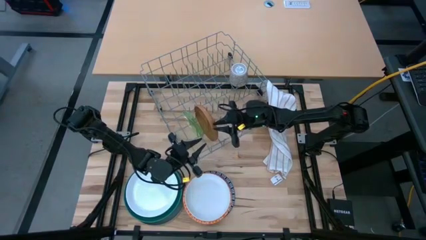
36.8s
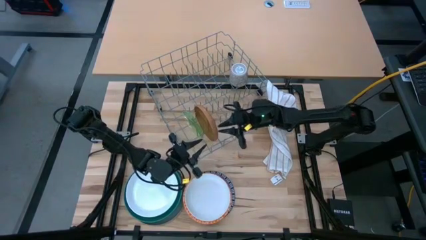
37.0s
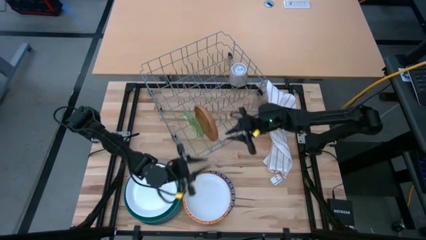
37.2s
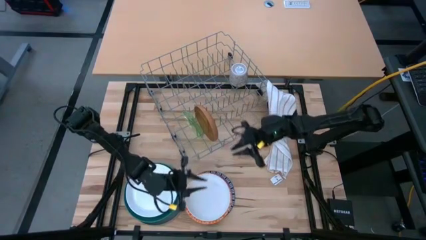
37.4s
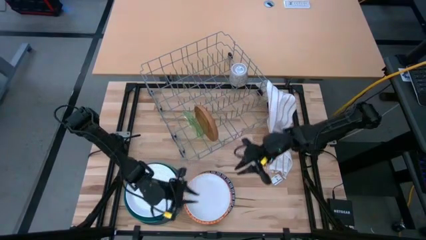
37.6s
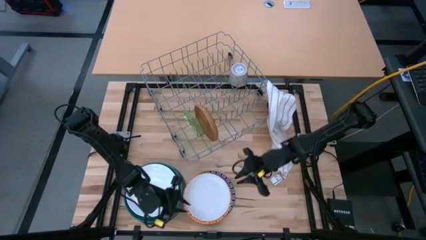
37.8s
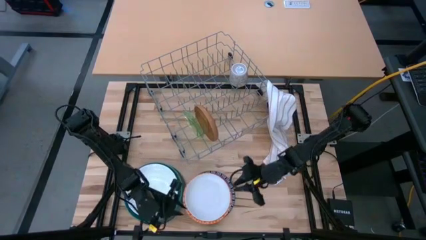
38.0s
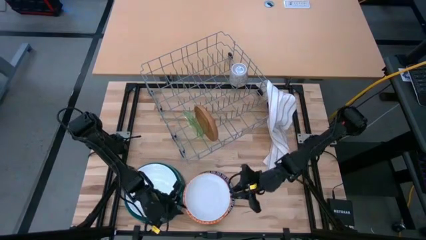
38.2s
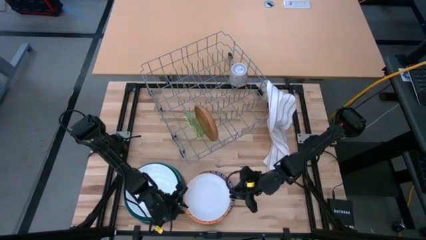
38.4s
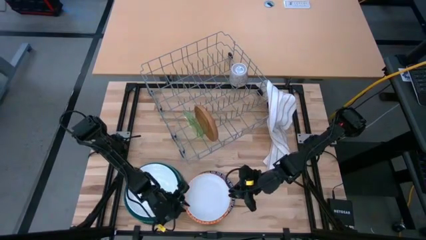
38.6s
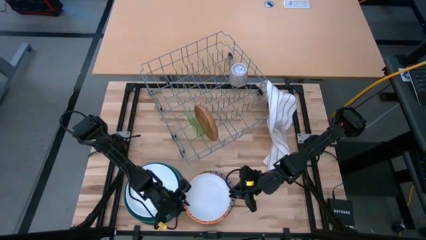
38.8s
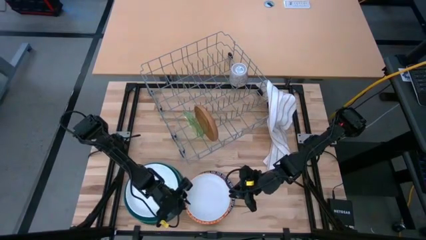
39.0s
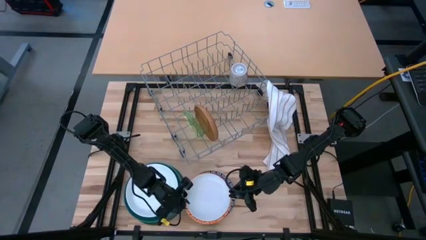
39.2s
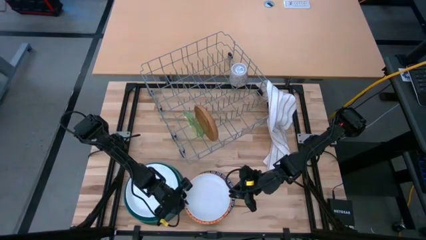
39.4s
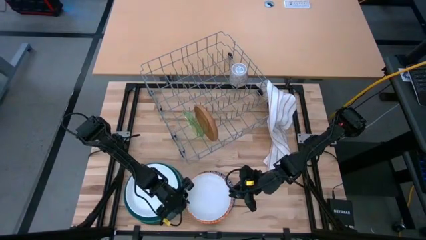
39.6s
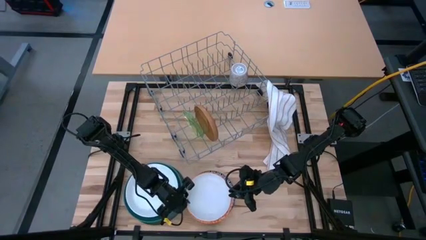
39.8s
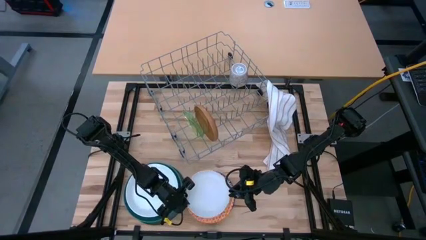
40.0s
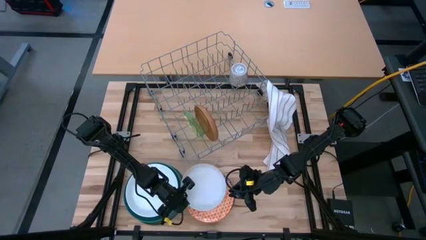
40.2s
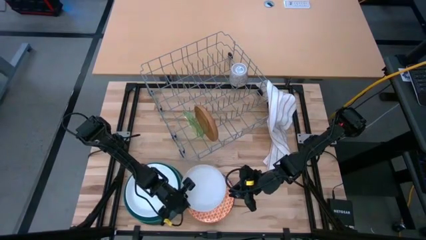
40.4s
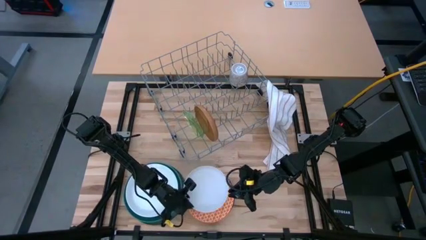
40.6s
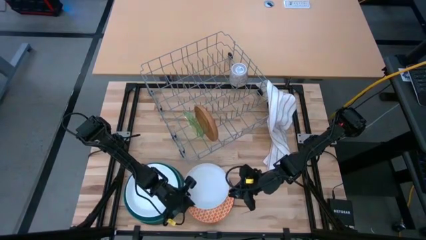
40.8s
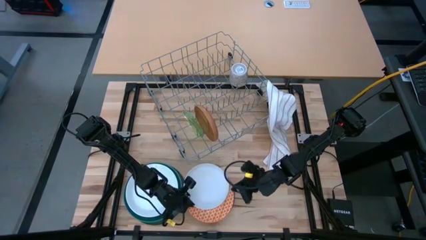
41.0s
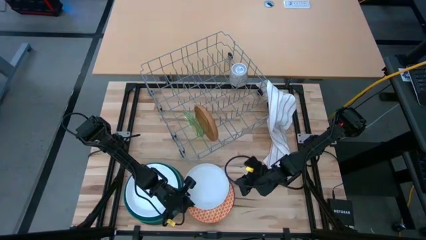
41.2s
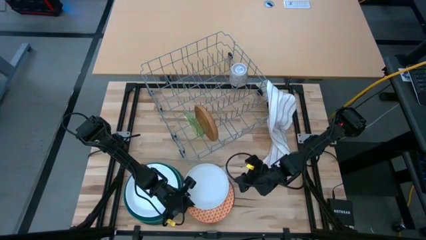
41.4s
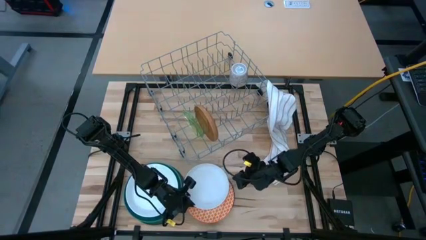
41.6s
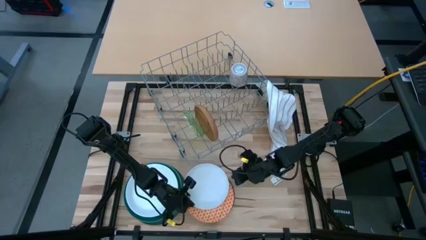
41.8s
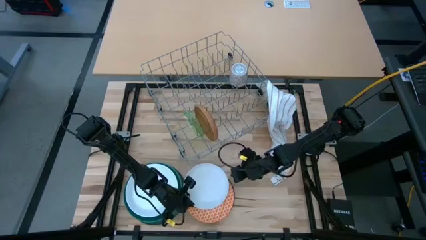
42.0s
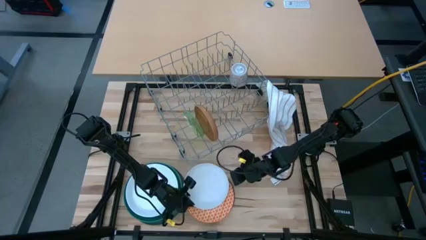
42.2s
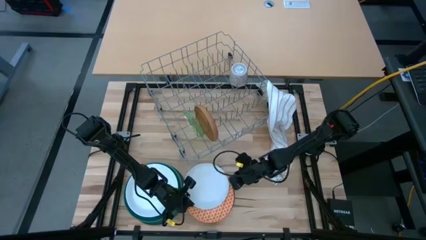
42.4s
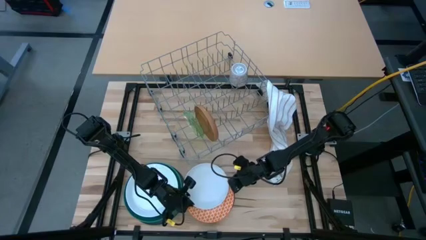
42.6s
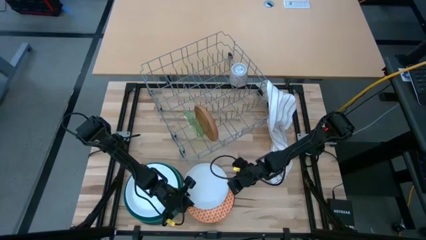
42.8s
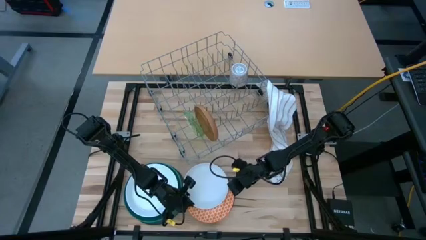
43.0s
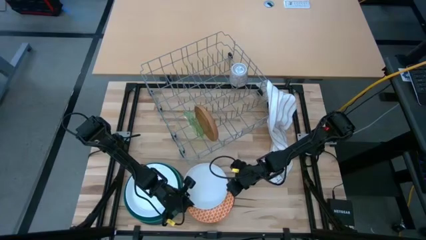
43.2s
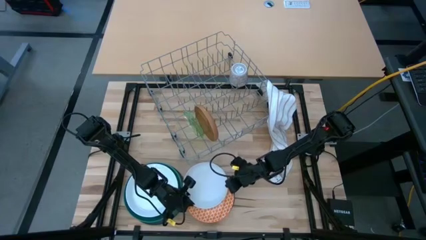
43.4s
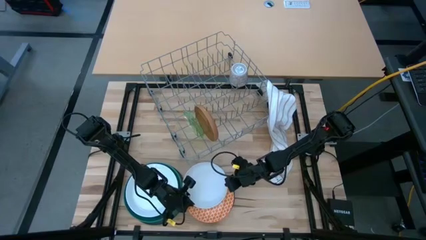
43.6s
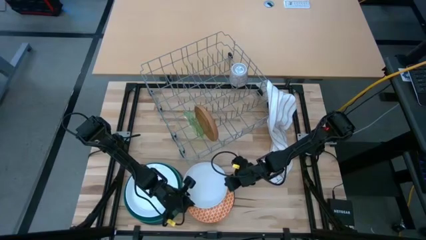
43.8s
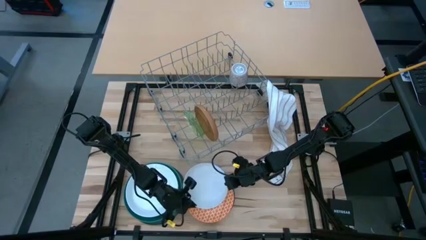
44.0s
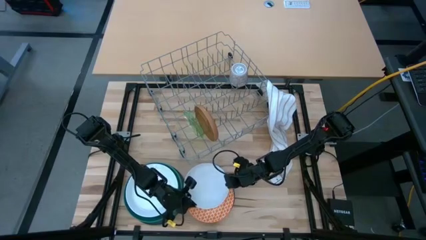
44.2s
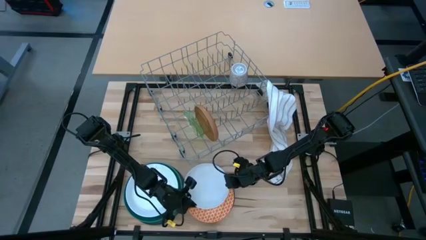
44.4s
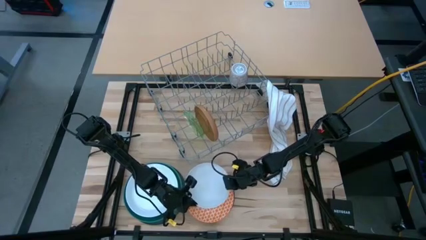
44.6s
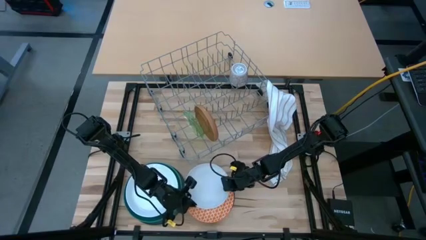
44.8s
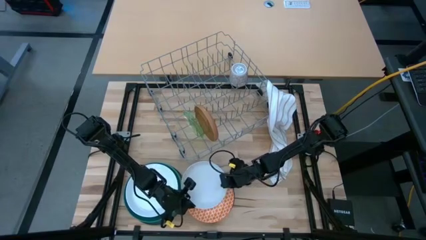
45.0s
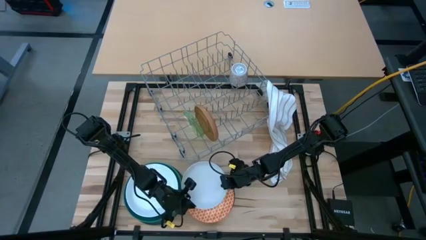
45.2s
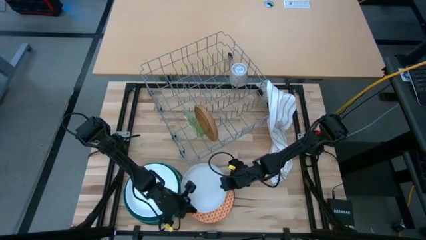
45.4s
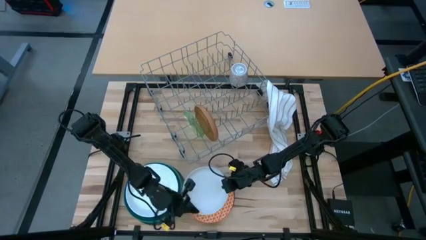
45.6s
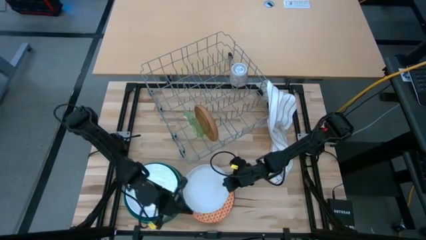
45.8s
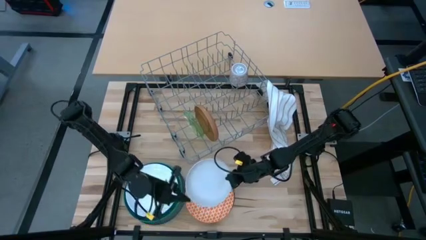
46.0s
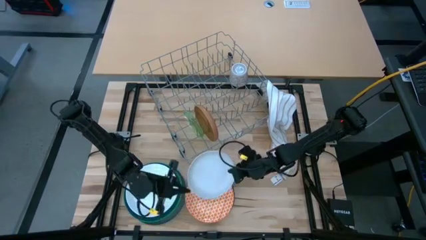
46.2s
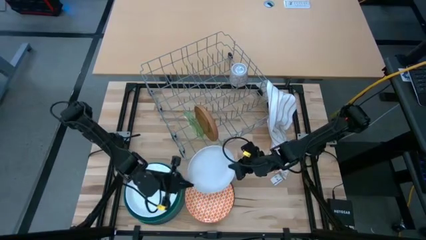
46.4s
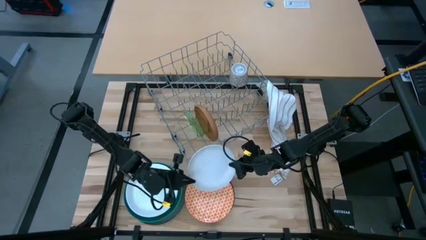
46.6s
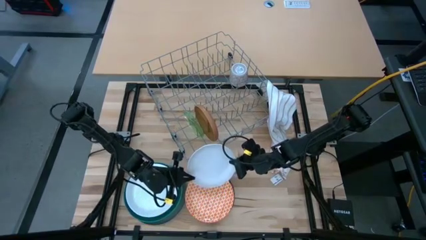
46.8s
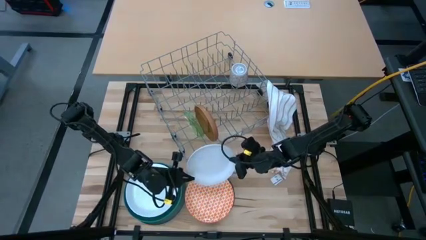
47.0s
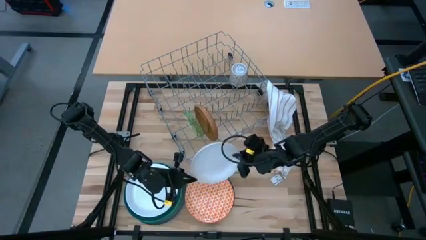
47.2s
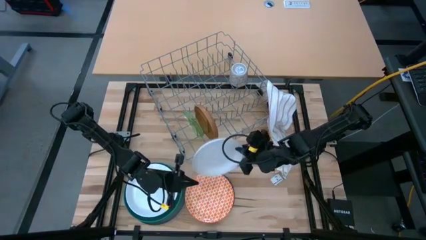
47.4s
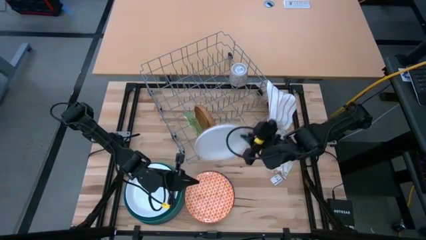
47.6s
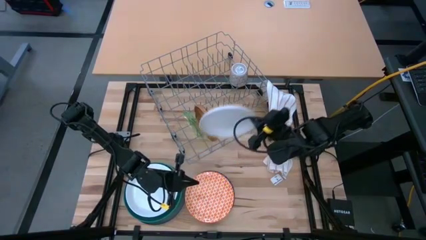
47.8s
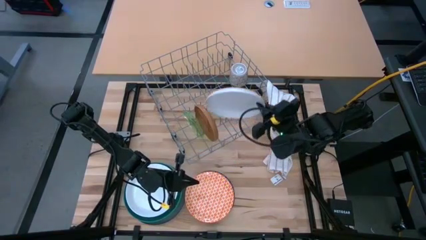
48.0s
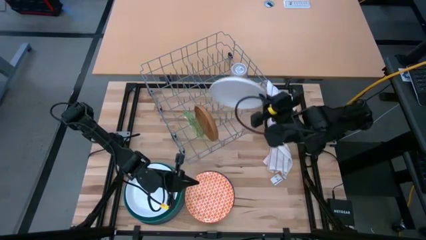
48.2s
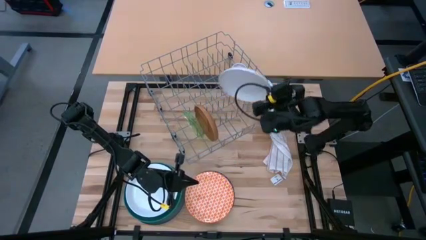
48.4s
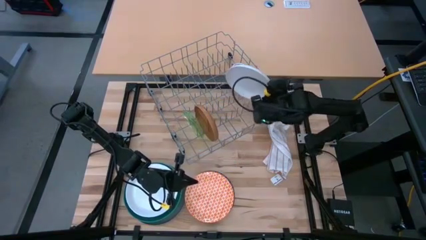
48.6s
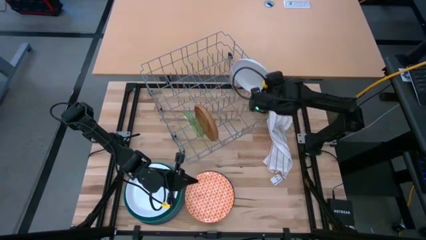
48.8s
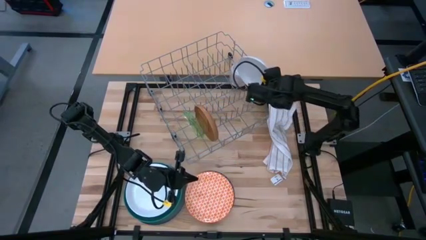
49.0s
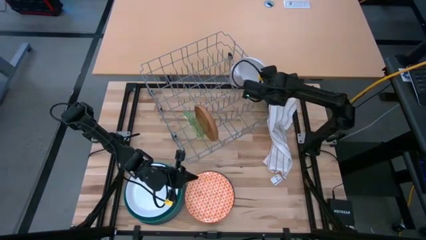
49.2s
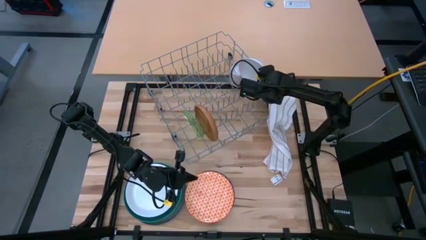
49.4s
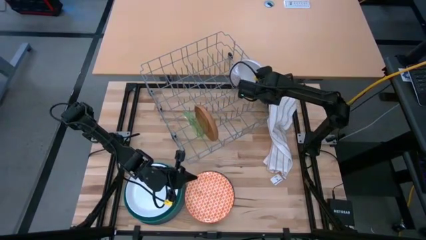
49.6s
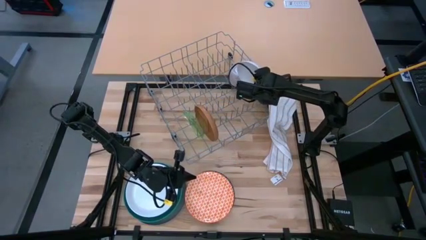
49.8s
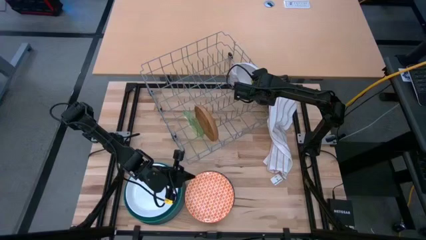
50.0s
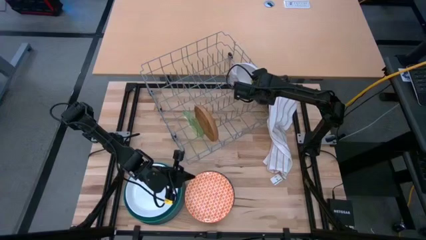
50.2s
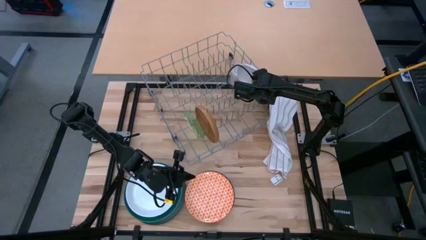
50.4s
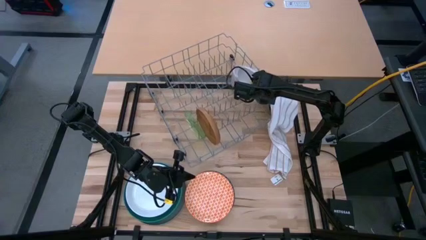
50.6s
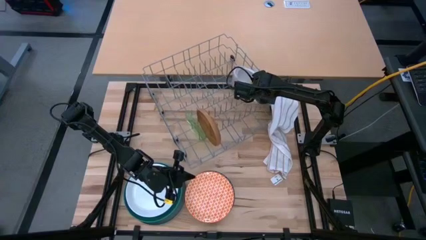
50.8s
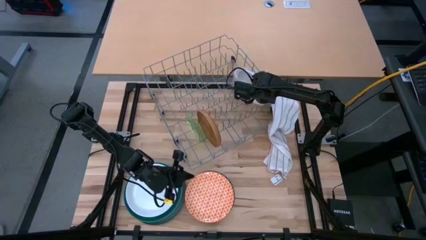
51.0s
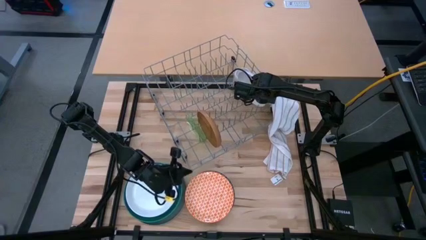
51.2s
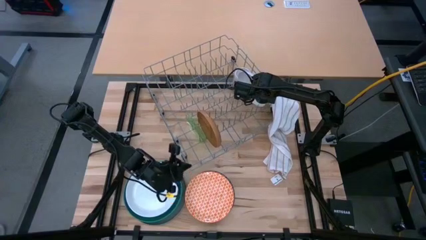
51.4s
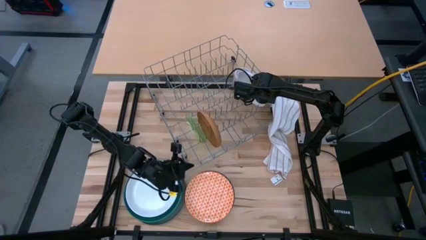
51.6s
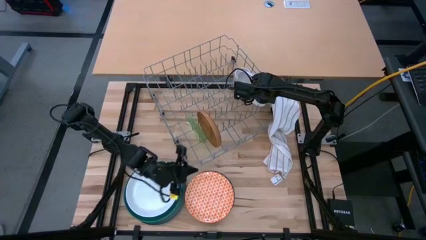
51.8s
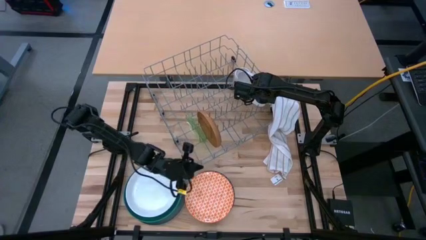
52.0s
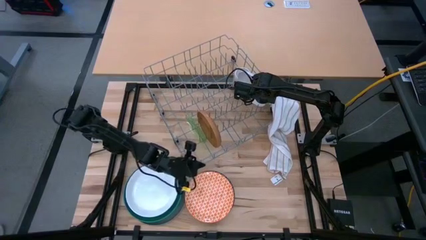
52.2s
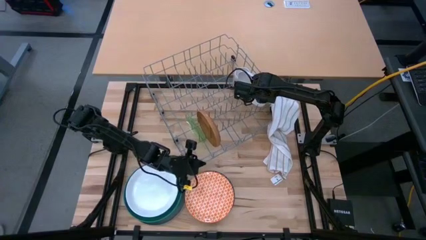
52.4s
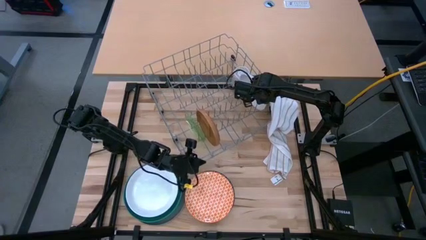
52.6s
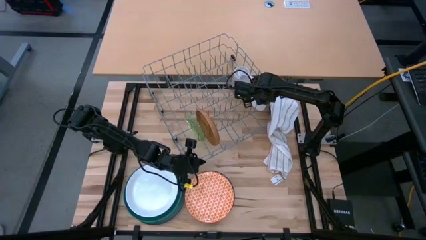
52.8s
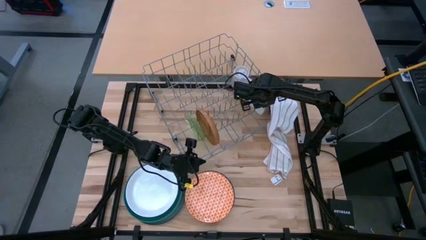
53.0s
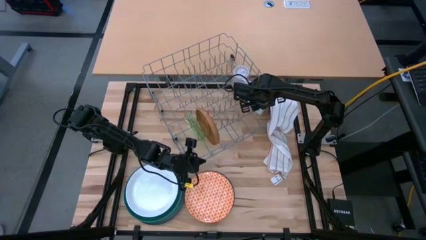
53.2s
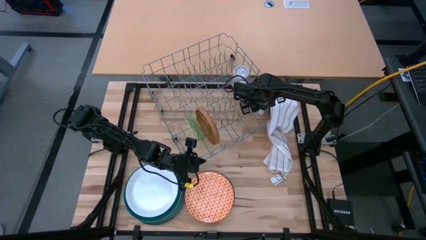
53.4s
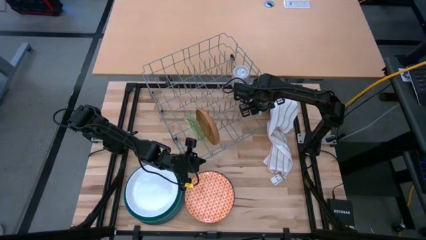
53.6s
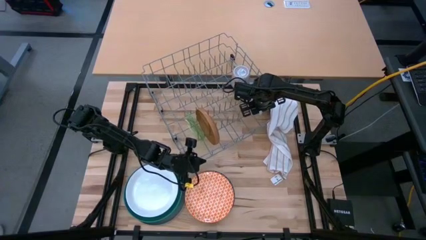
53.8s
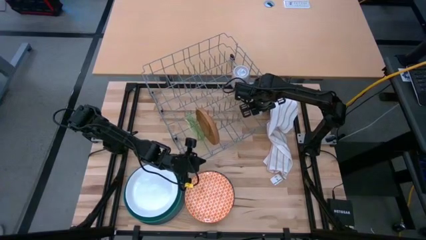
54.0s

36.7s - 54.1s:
Task: Sort dishes
Put the white plate into the dish rack
